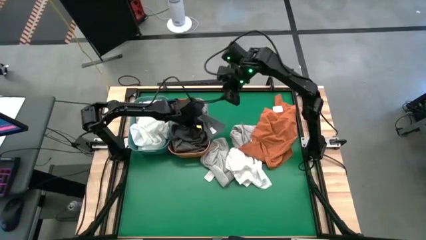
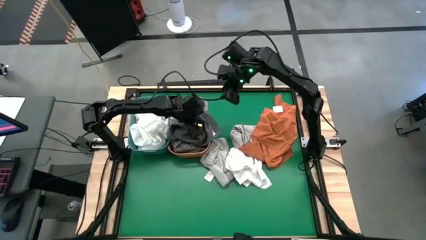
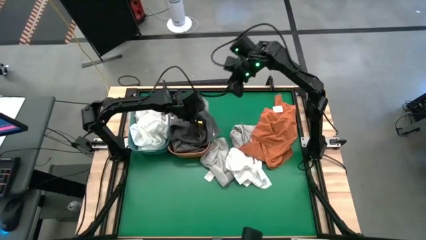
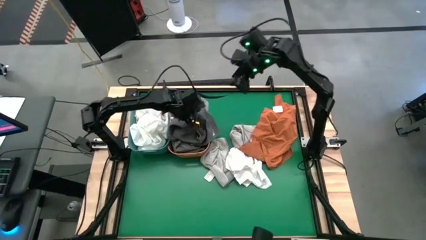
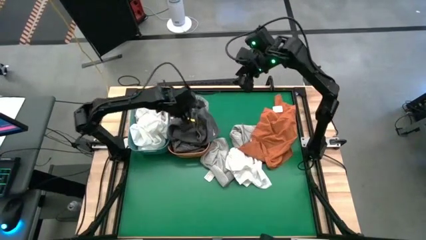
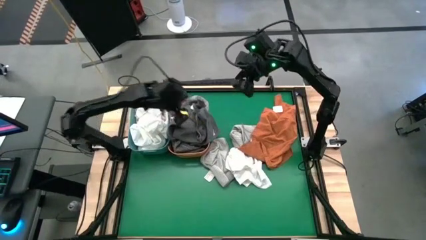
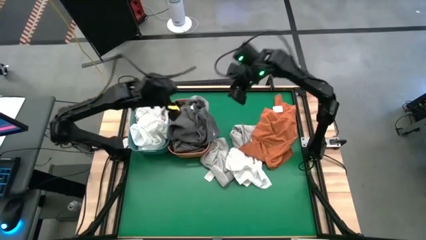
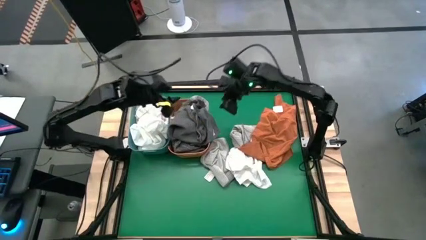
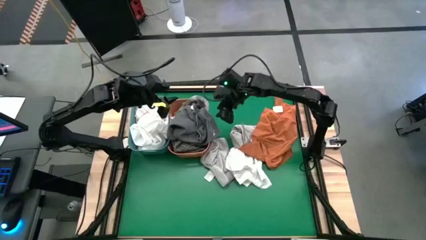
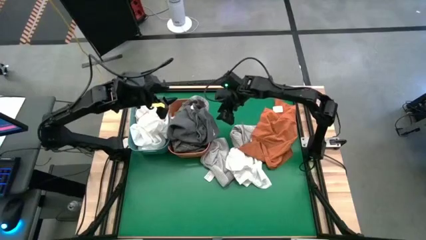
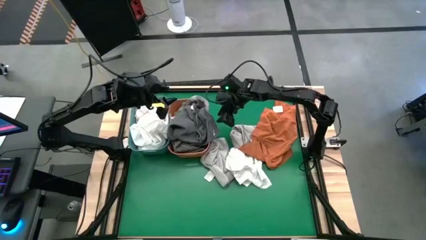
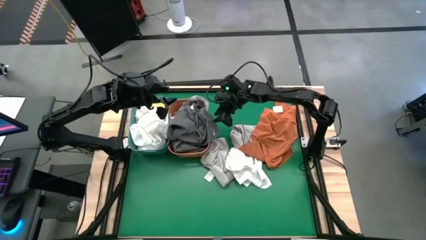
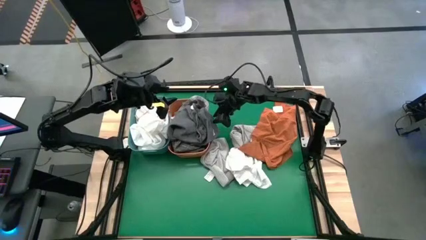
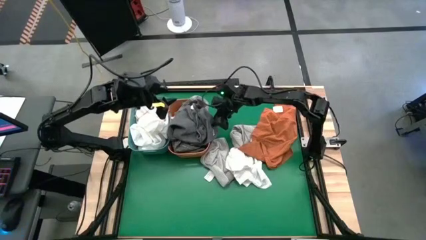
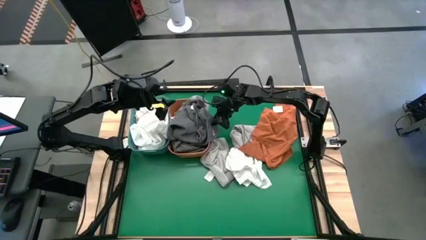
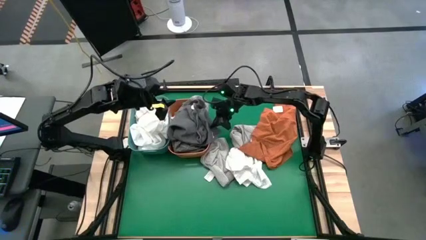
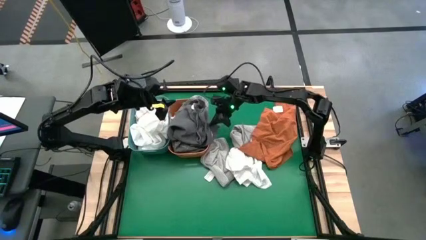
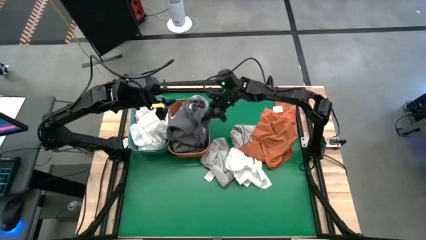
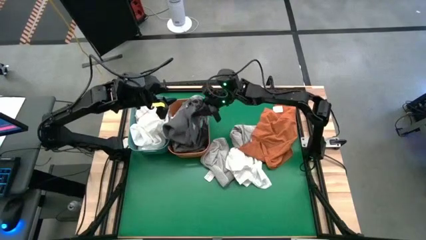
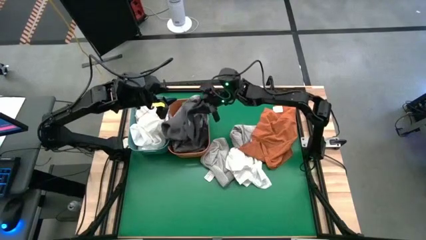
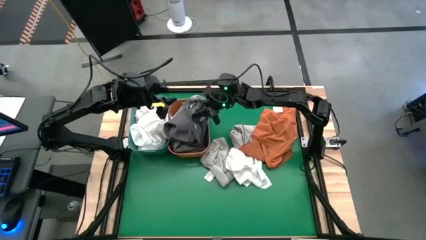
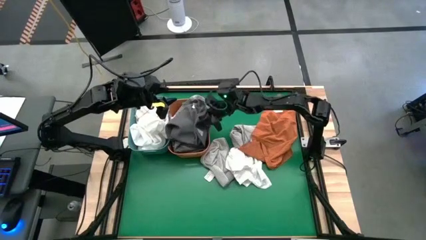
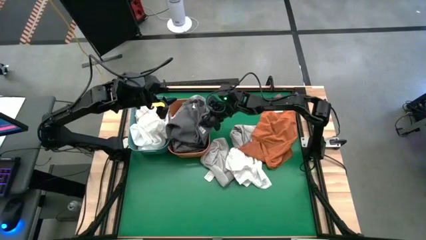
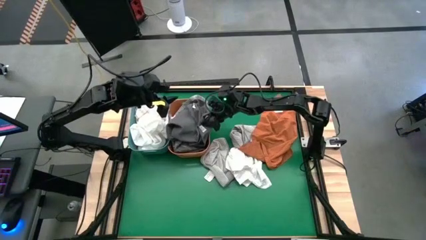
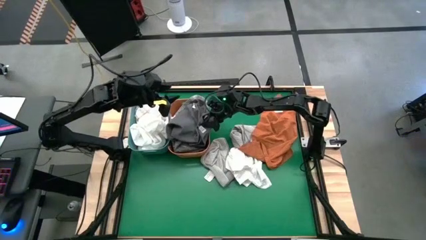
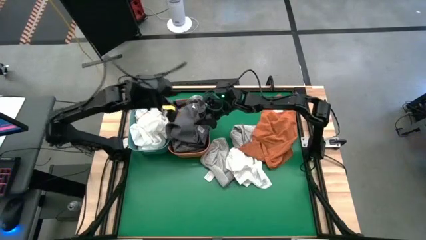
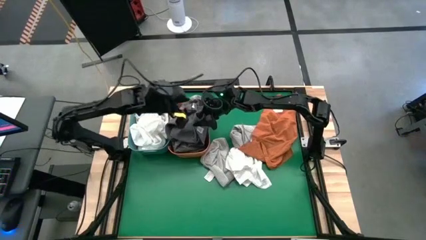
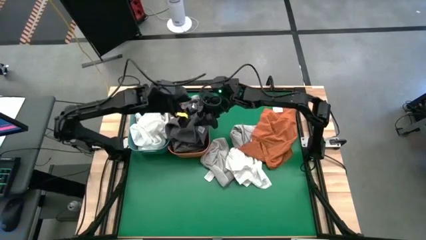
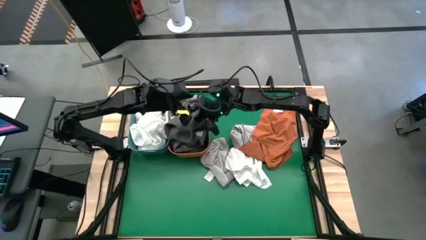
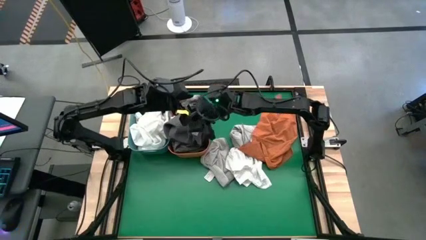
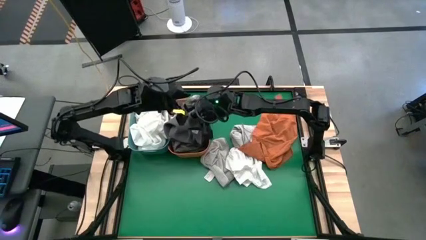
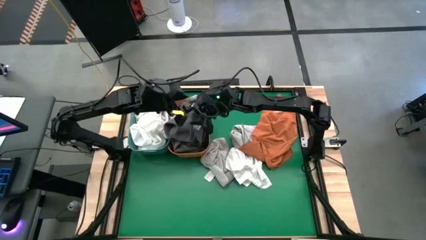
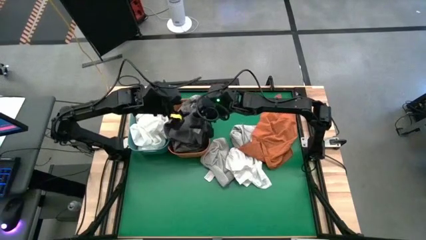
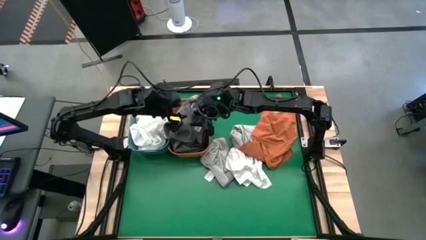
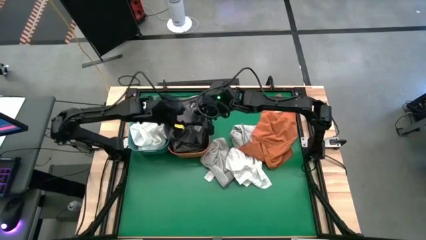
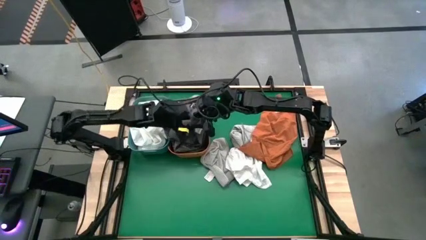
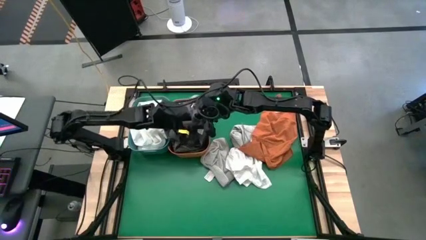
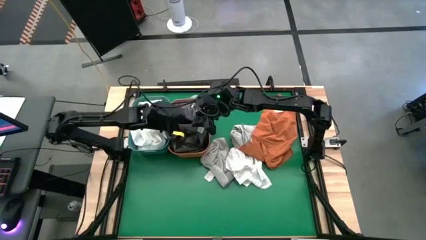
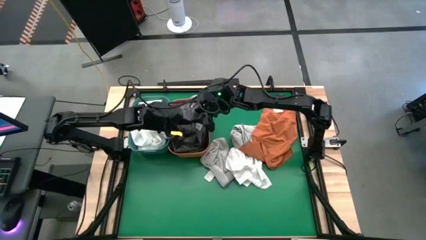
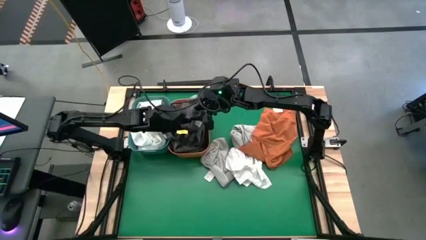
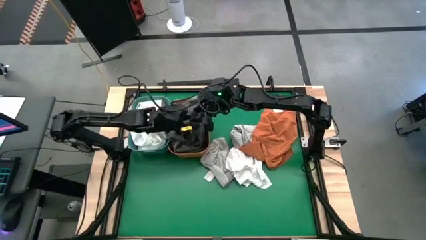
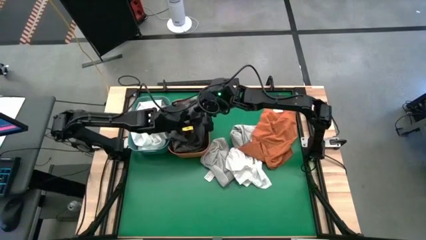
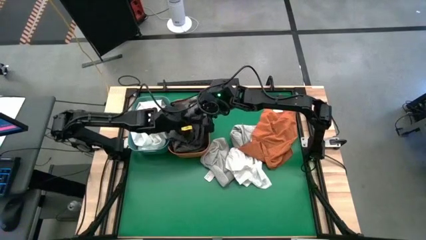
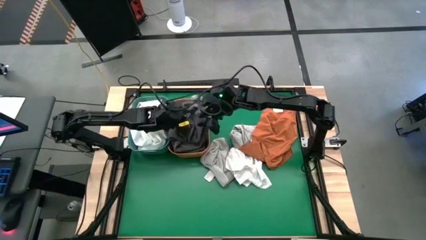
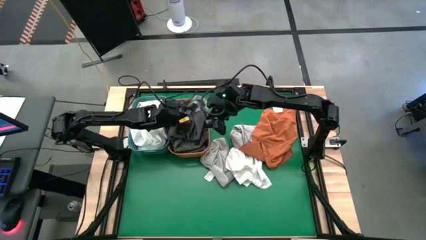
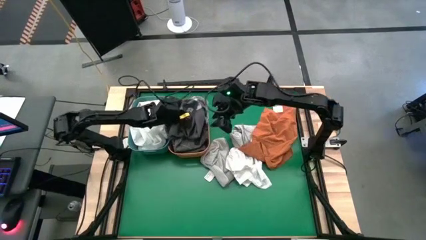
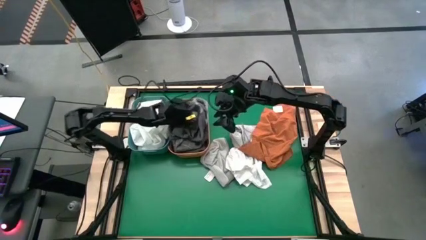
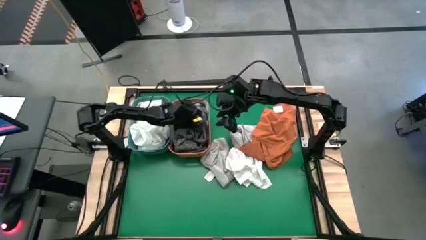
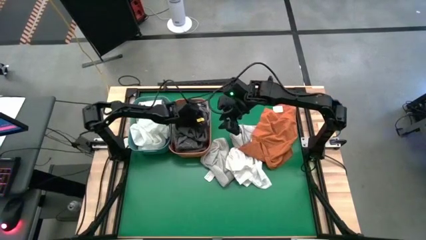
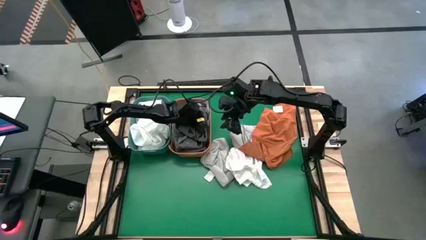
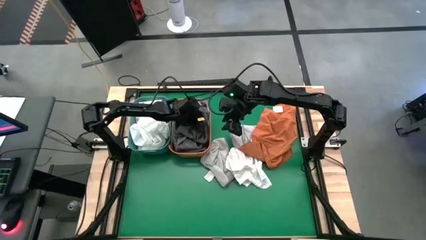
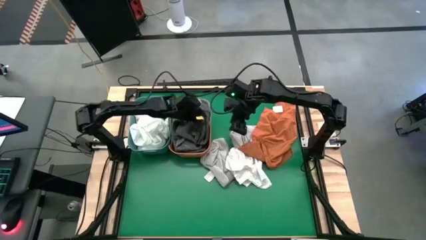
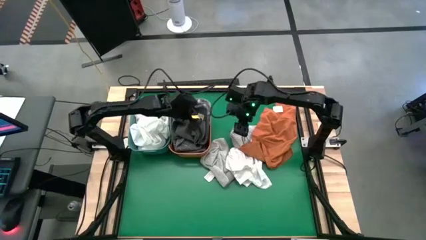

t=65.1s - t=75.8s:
Task: Sort towels by color in basket
Put the black towel into the orange bin

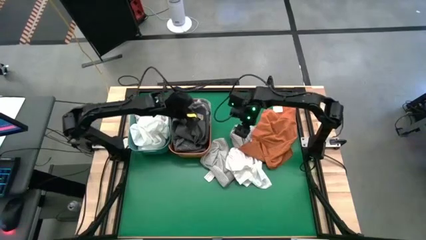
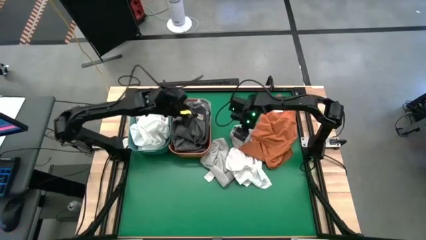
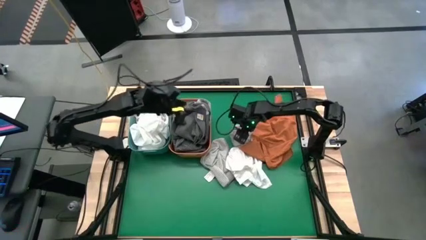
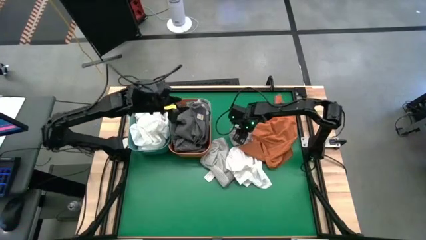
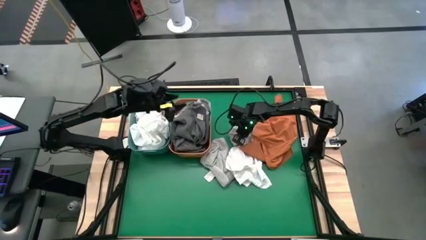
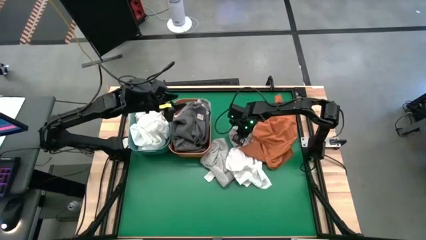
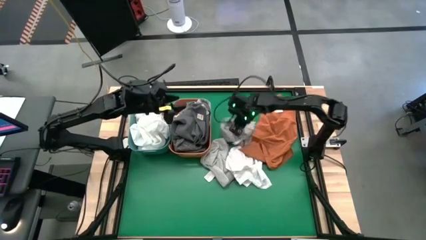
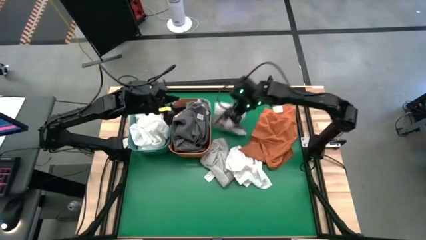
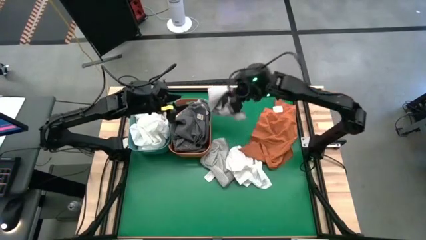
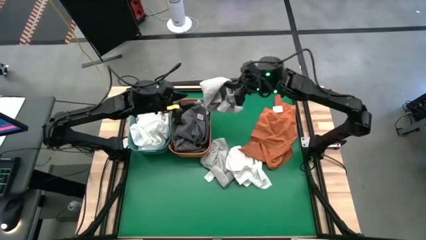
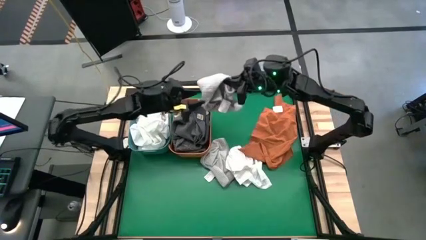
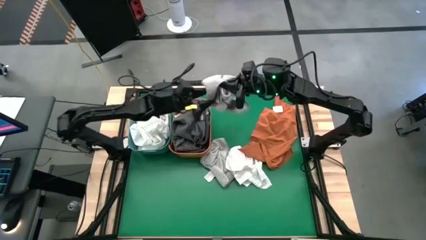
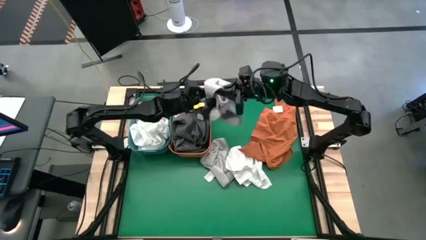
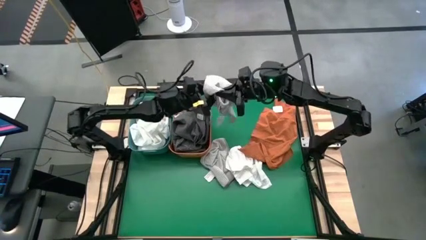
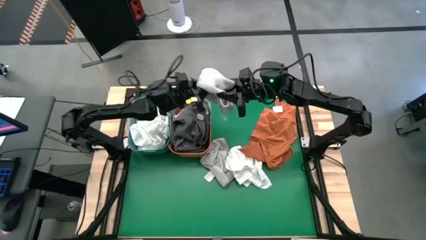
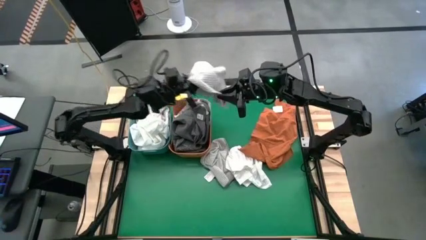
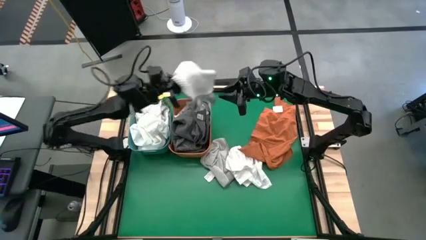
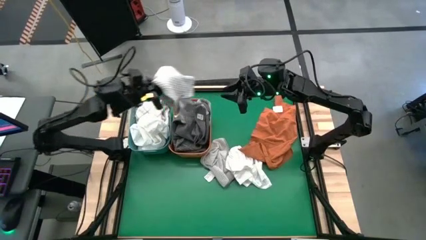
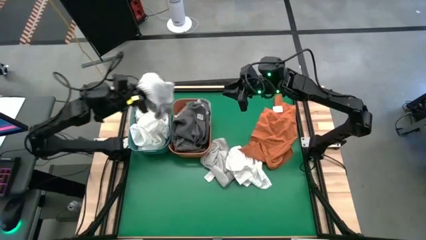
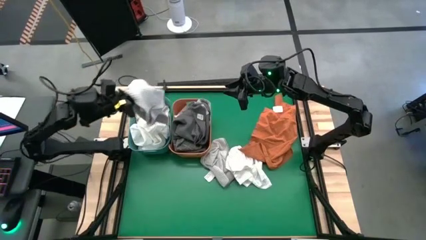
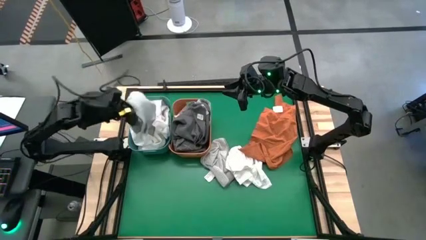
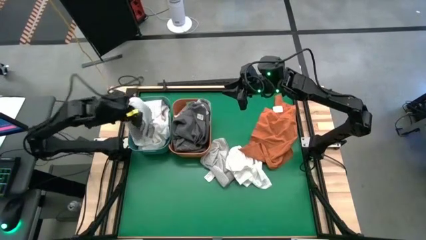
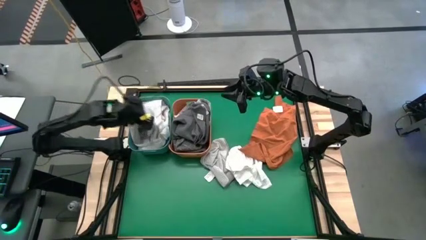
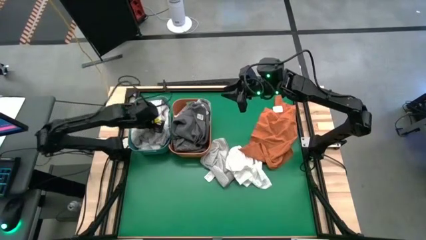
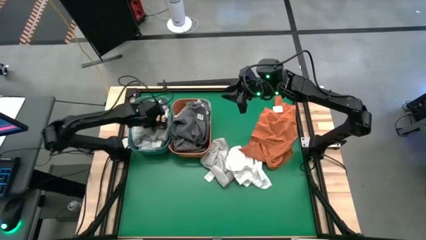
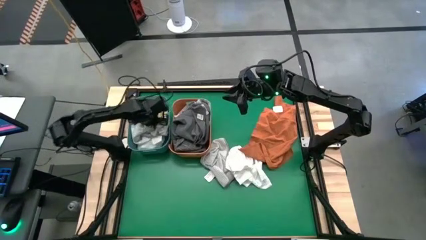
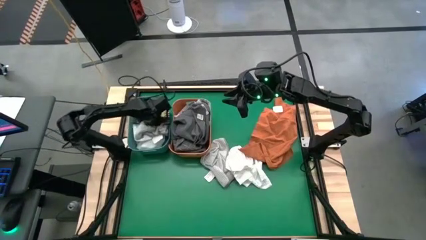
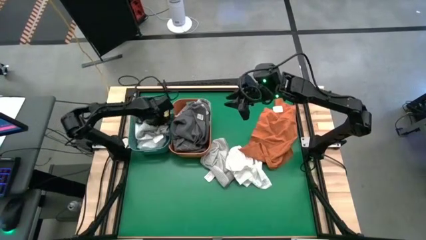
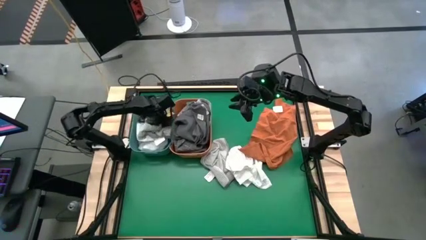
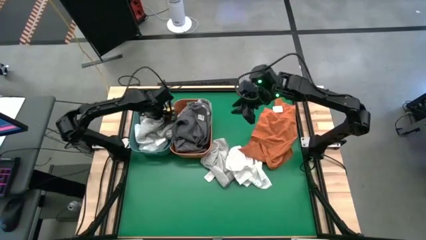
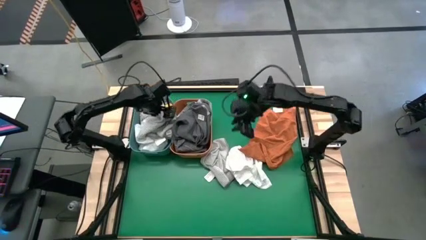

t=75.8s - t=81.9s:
Put the light gray towel into the blue bin
